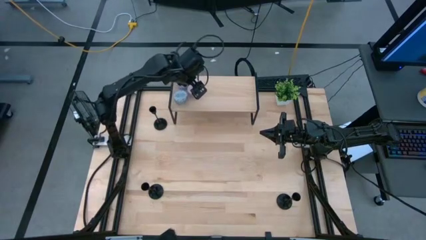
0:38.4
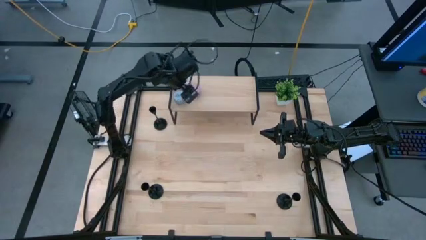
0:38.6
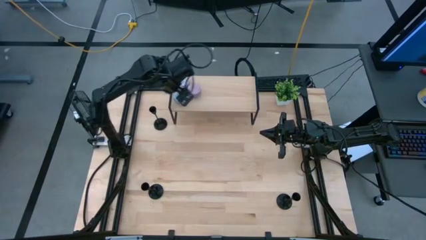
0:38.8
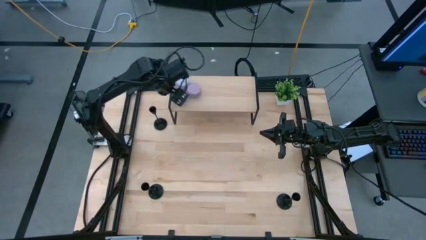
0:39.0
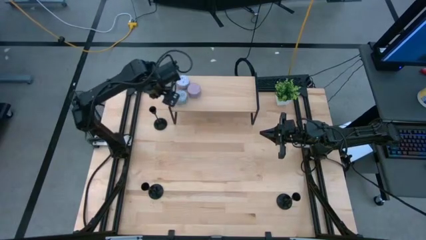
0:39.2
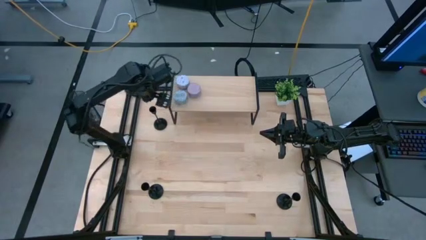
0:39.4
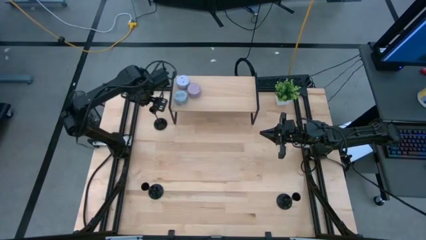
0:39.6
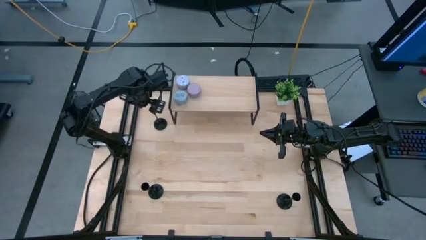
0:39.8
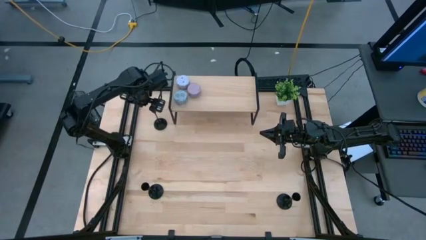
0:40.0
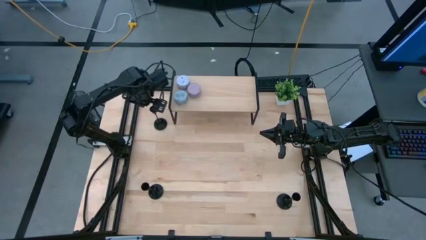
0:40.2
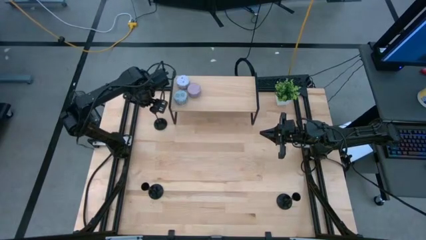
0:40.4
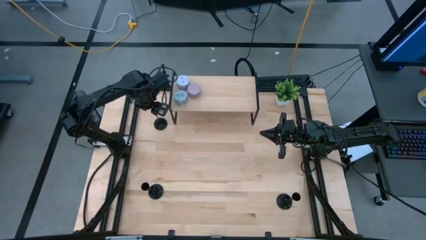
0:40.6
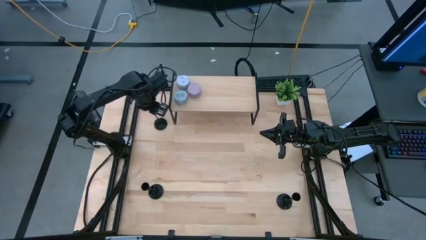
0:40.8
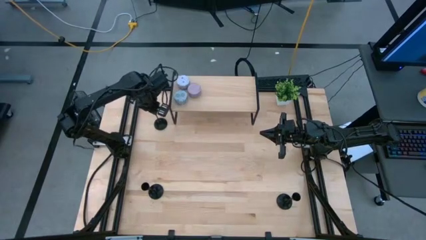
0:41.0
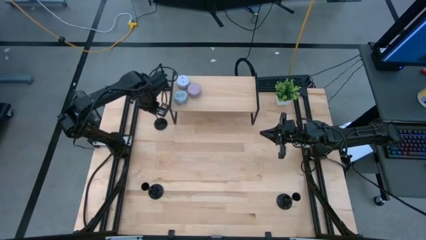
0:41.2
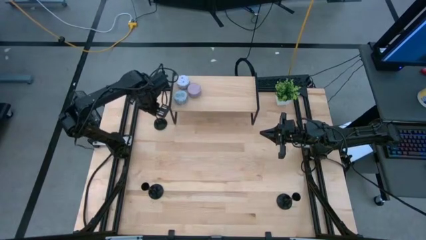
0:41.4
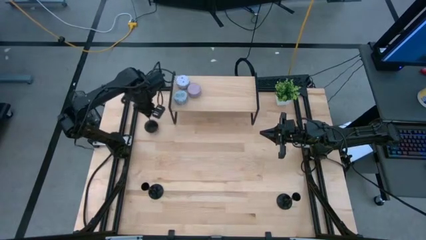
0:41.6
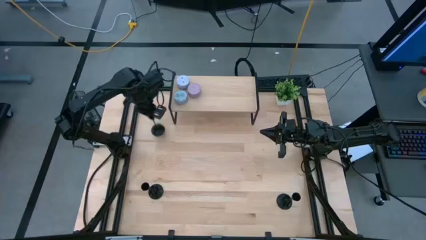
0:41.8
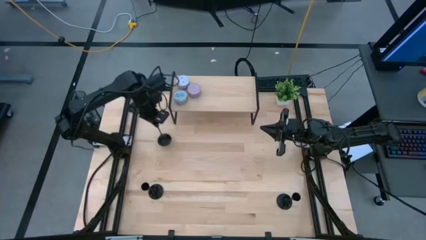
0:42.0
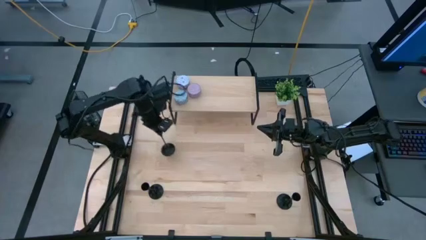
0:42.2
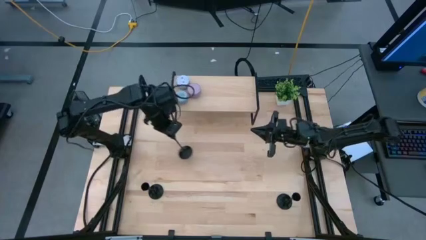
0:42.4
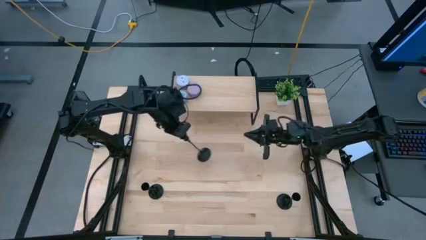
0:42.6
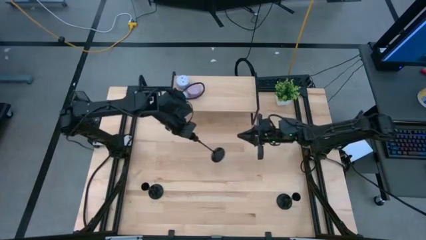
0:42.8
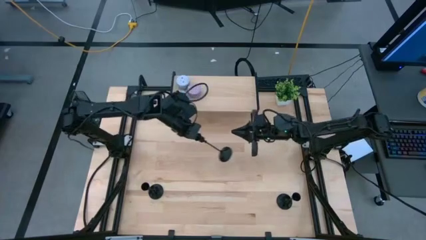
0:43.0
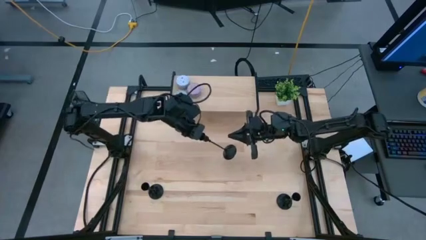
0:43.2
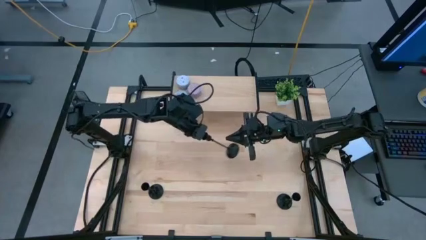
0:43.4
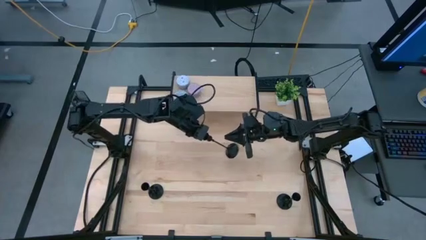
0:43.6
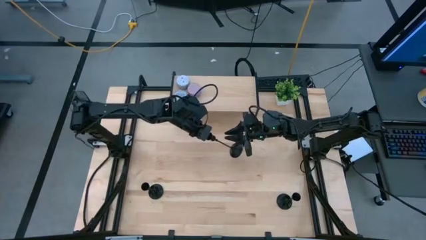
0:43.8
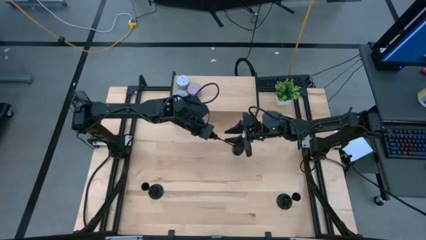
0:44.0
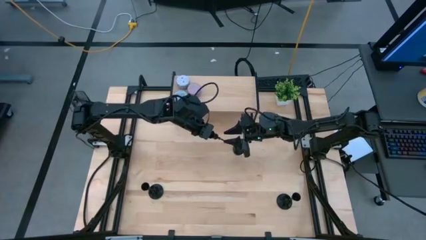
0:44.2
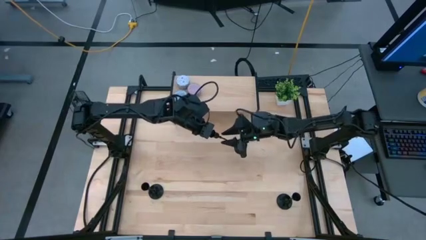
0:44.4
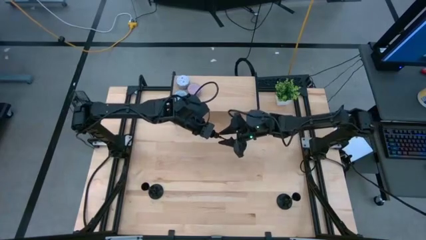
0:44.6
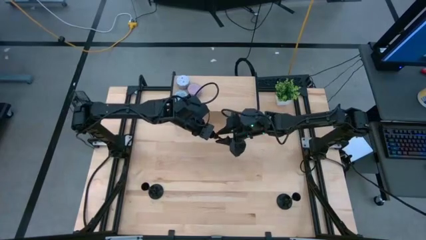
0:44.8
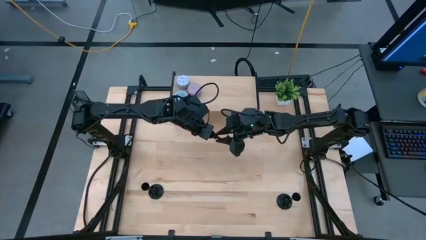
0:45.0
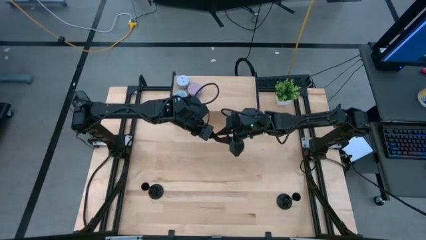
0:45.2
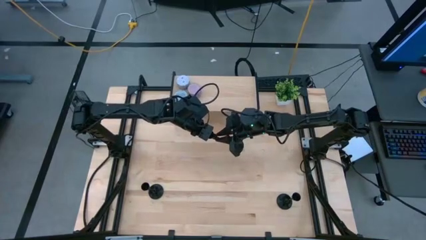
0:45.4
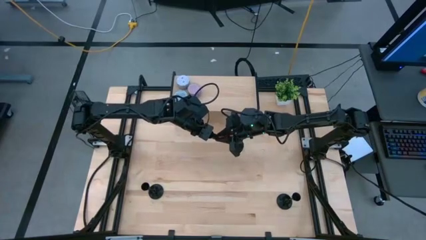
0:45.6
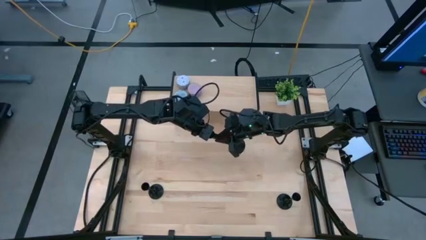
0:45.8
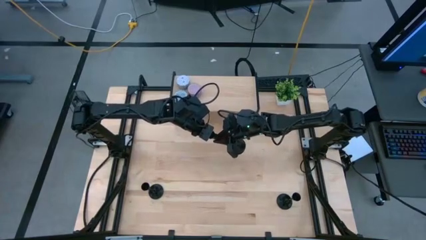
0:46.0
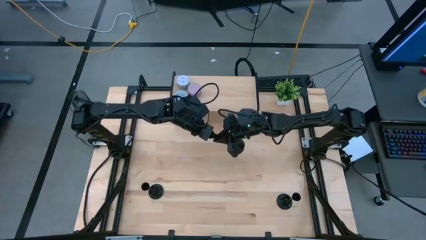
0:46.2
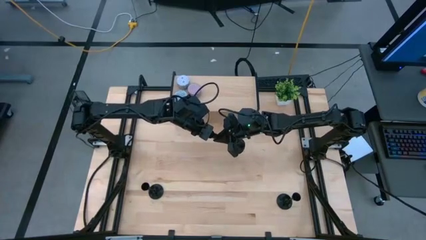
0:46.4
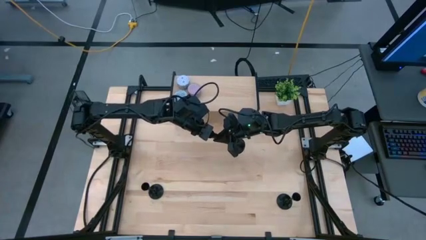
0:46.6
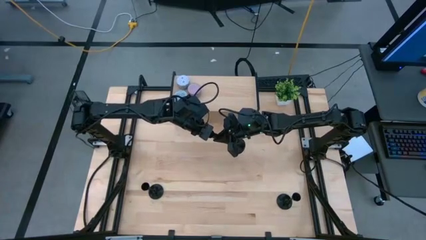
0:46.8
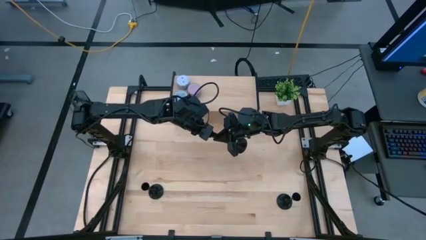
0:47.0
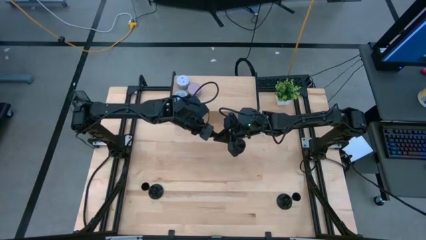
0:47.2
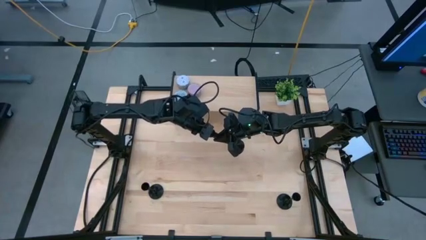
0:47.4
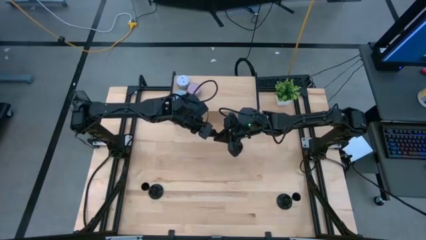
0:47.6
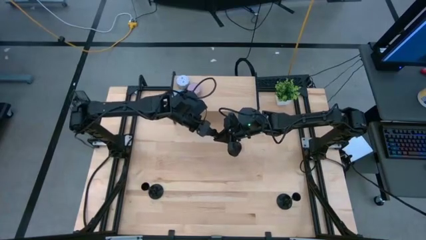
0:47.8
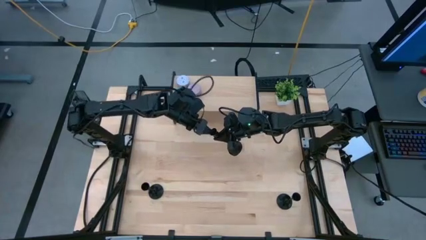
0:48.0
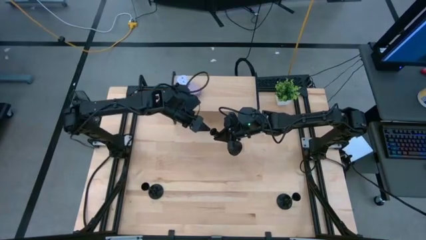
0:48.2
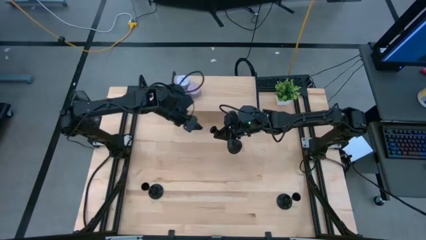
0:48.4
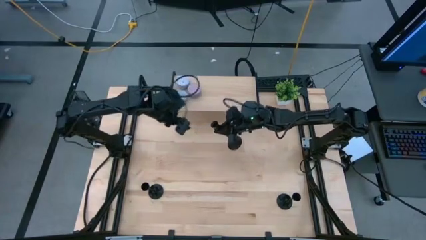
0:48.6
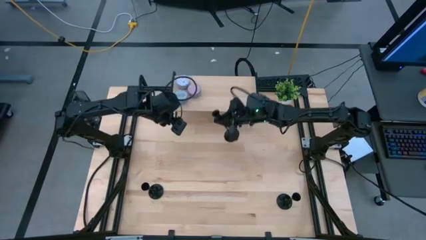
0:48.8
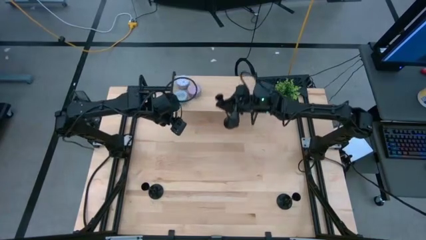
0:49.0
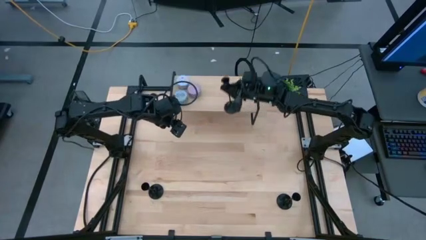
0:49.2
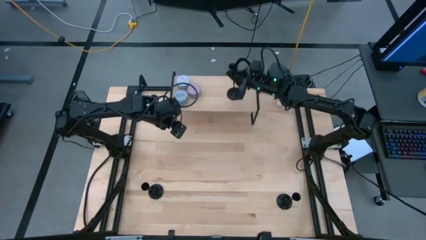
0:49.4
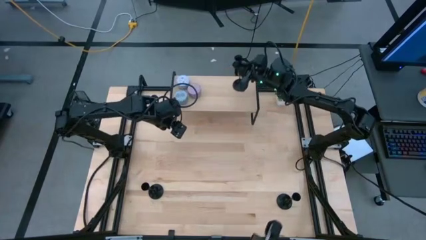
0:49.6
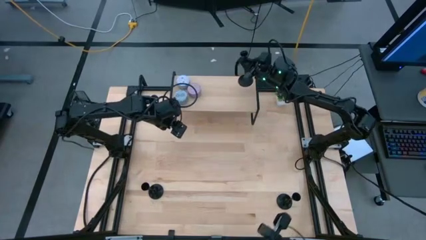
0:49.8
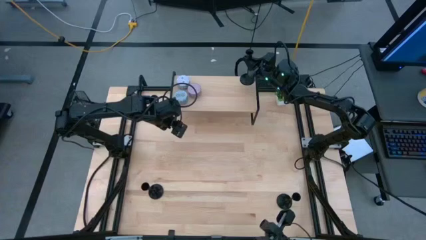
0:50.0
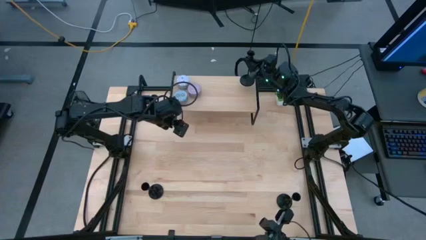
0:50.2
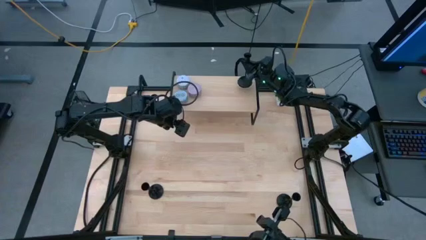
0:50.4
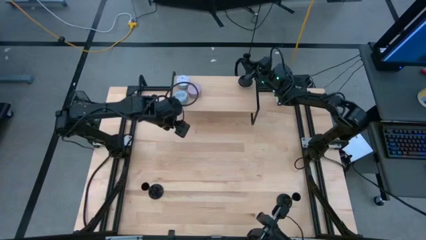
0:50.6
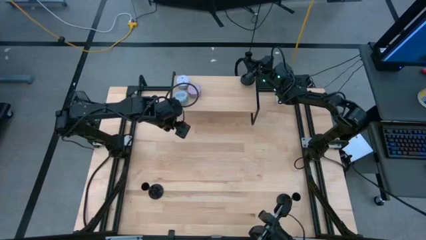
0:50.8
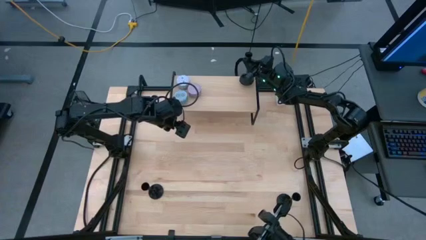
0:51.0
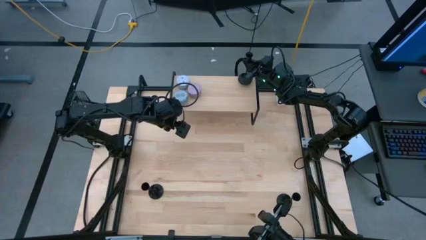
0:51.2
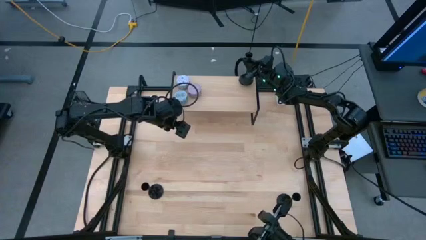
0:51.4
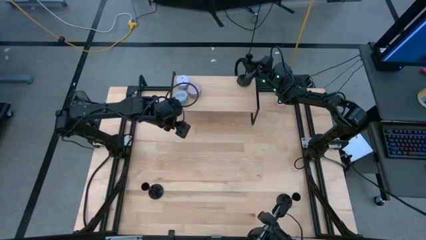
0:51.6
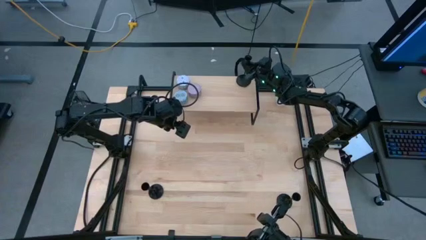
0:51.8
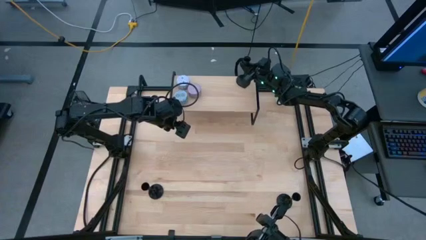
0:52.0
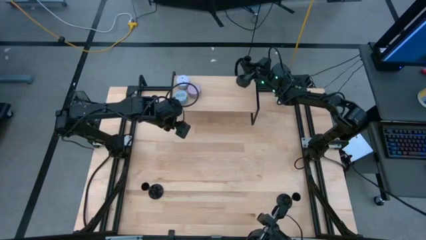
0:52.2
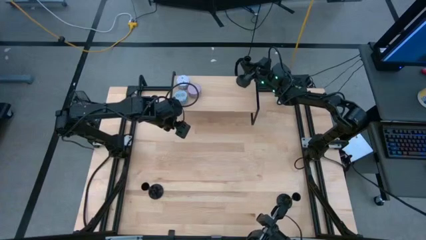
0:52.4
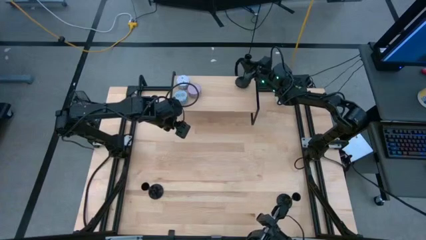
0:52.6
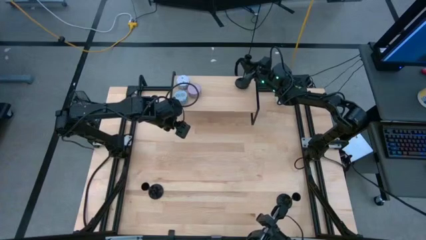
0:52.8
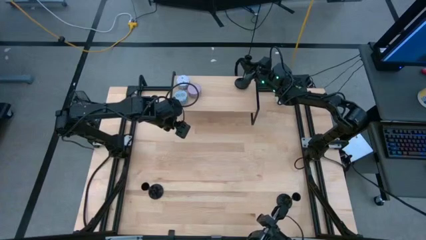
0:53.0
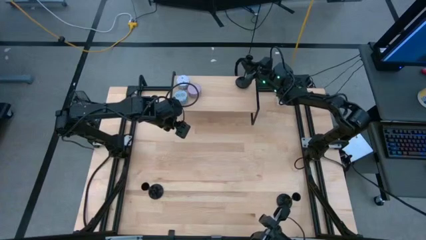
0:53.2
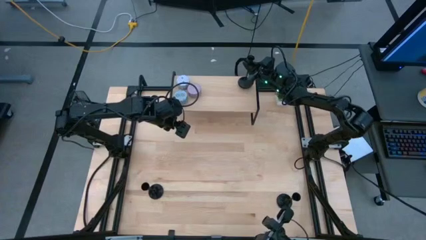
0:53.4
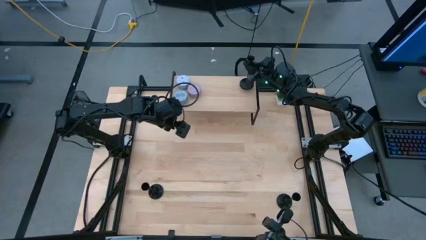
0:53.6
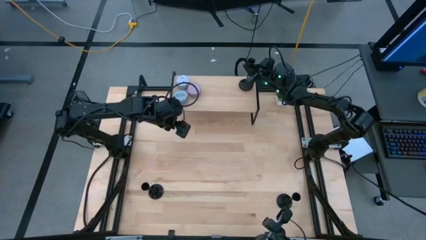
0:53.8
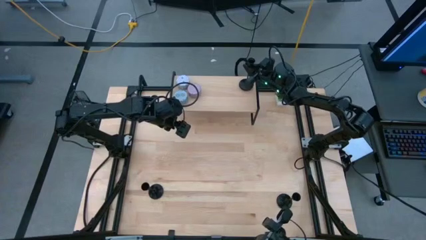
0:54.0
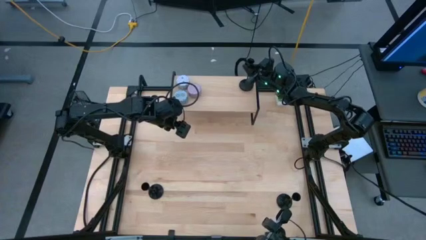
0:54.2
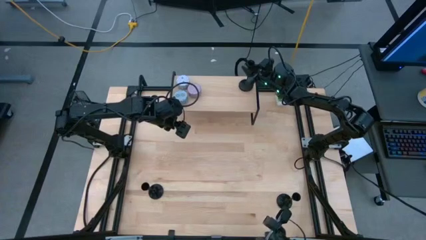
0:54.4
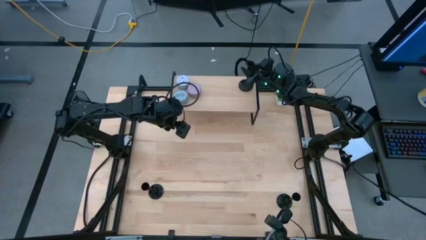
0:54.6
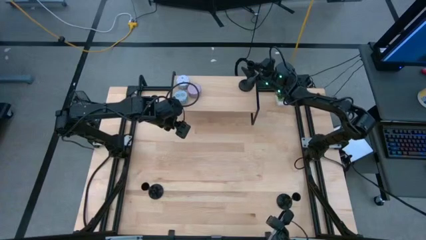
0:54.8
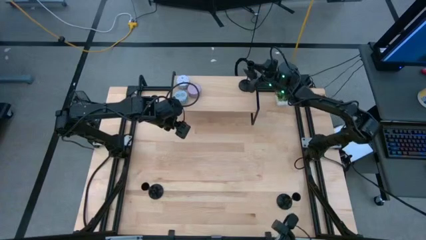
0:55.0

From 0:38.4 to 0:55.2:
Task: Pick & Place candle stick holders
Put the top black candle holder on the shelf
